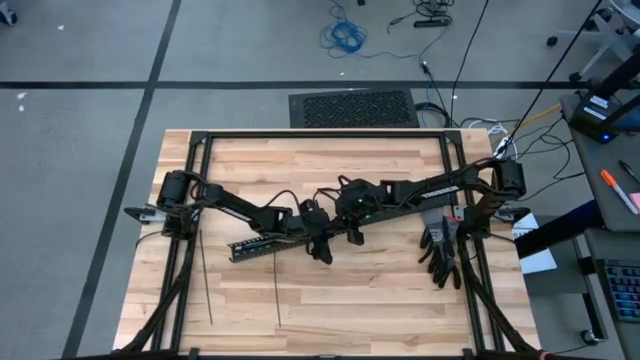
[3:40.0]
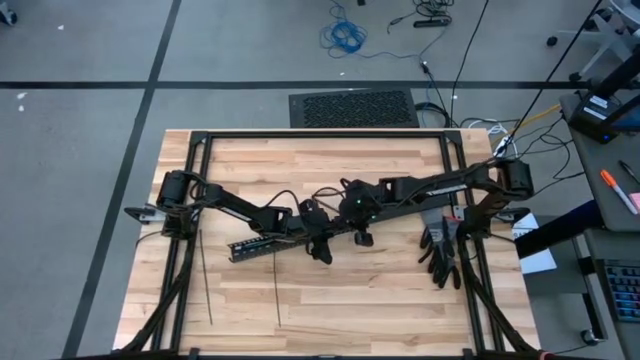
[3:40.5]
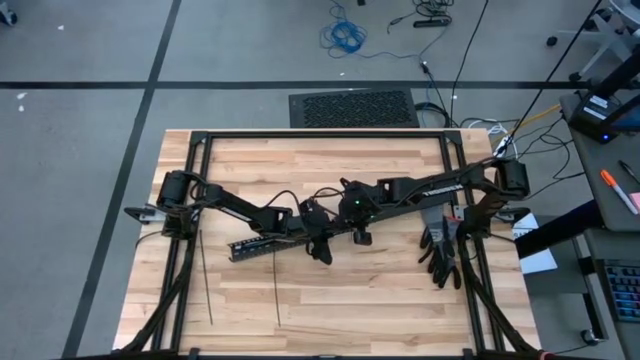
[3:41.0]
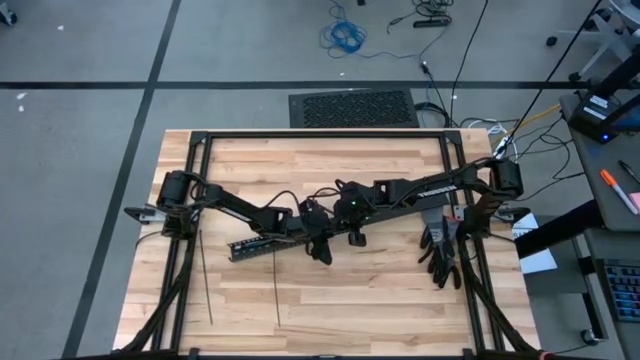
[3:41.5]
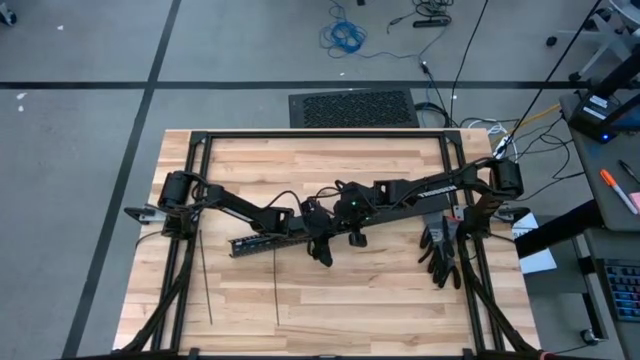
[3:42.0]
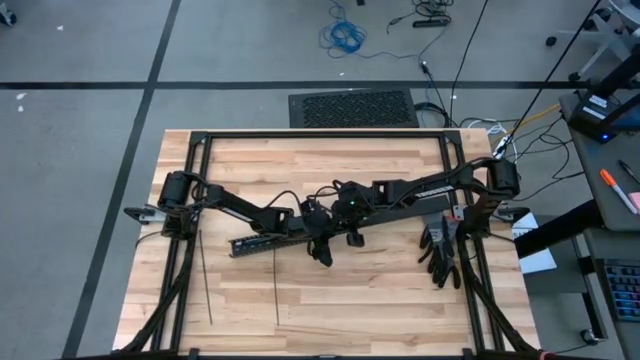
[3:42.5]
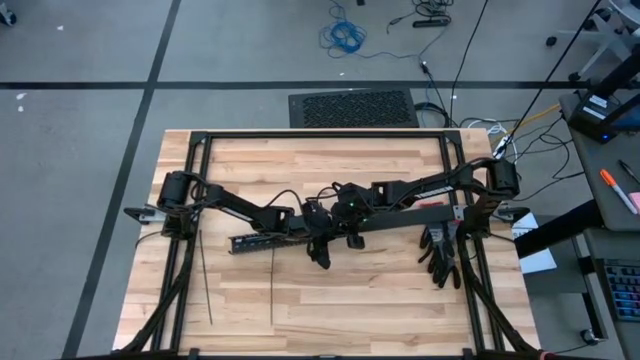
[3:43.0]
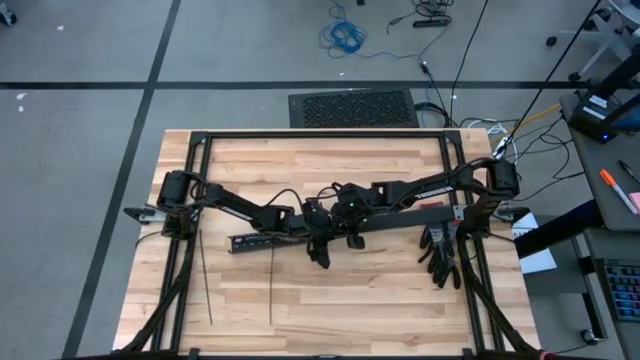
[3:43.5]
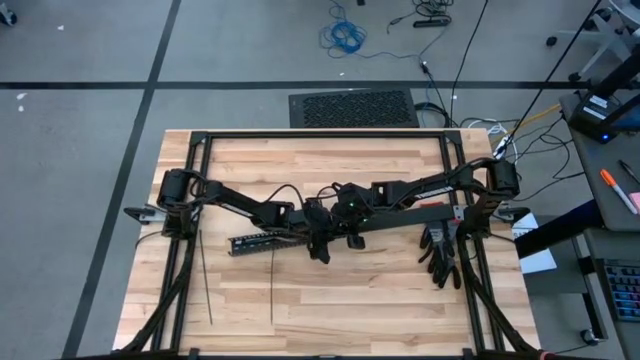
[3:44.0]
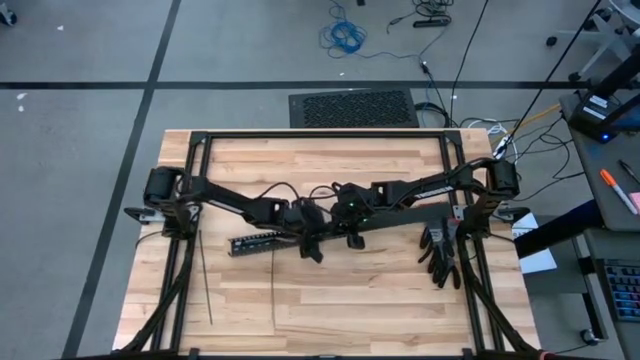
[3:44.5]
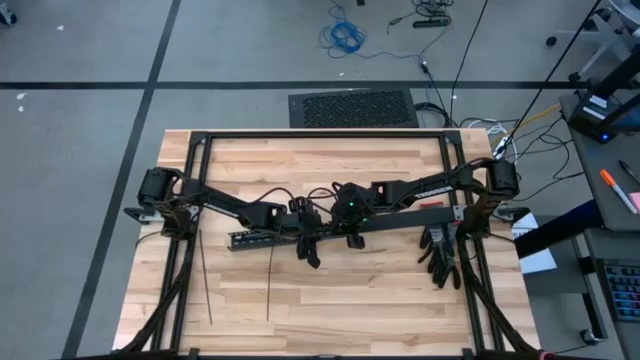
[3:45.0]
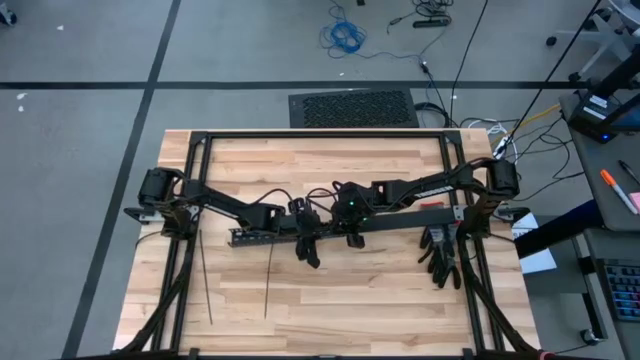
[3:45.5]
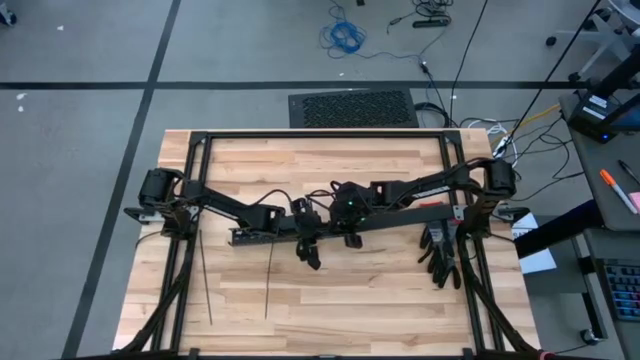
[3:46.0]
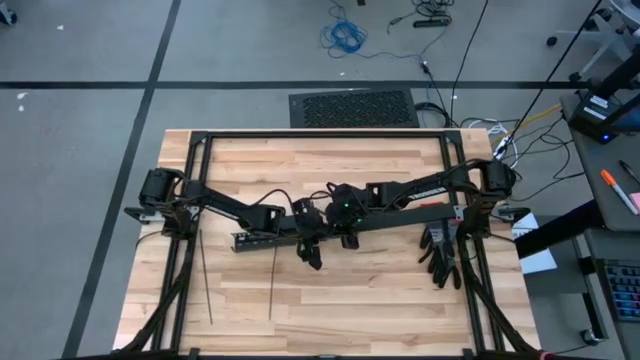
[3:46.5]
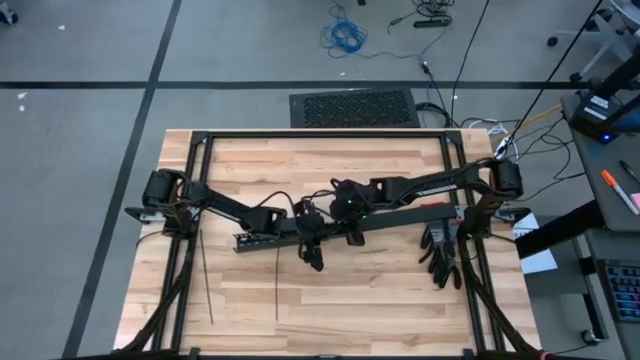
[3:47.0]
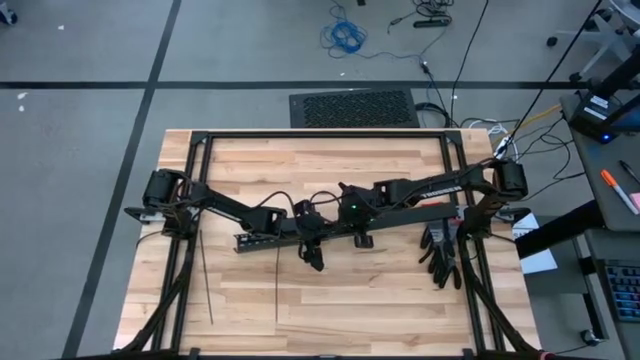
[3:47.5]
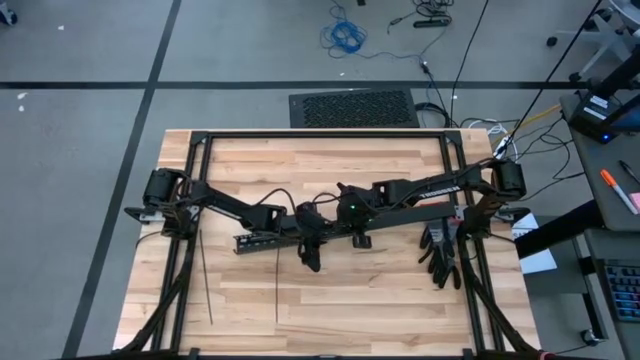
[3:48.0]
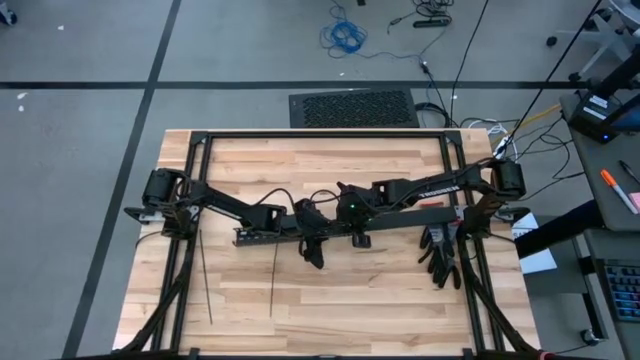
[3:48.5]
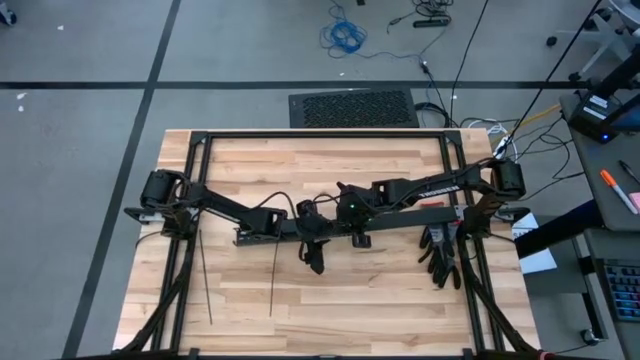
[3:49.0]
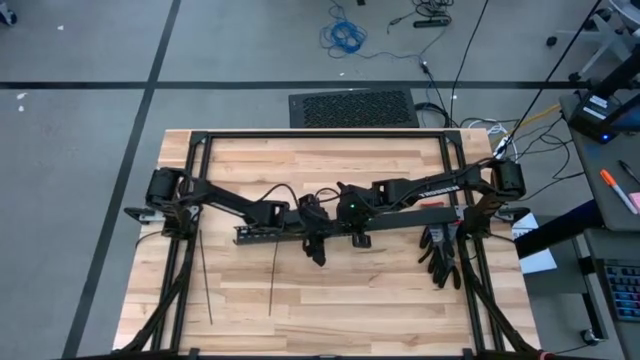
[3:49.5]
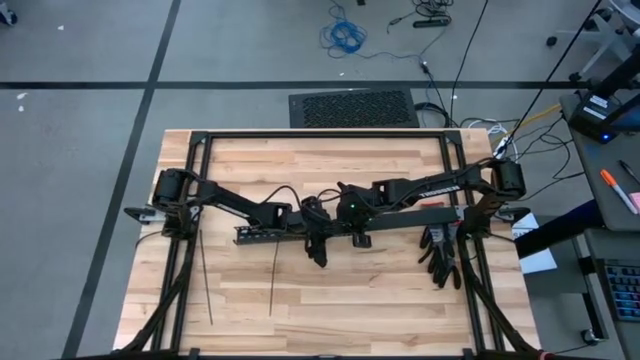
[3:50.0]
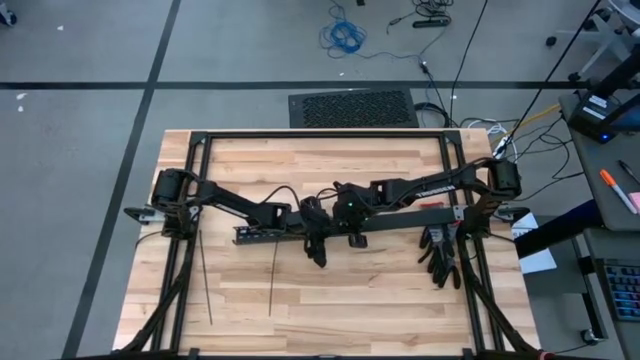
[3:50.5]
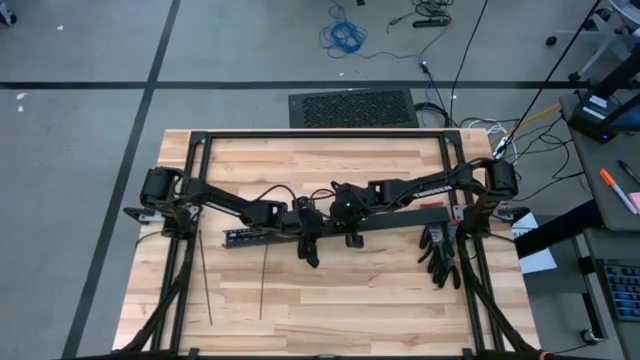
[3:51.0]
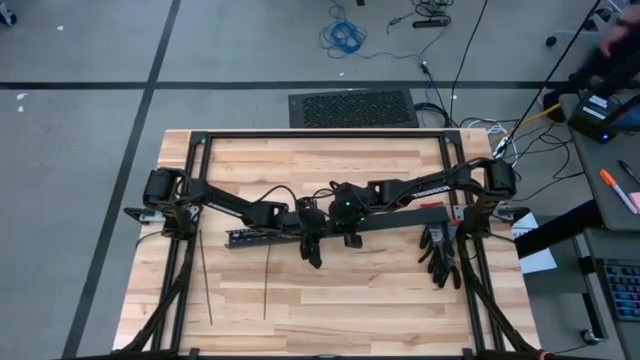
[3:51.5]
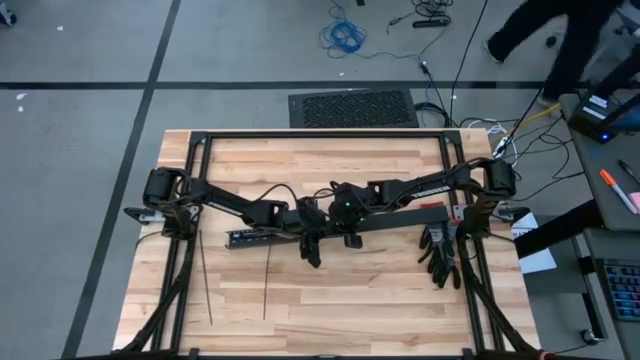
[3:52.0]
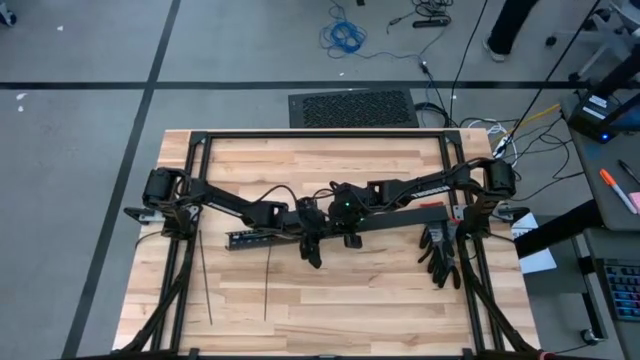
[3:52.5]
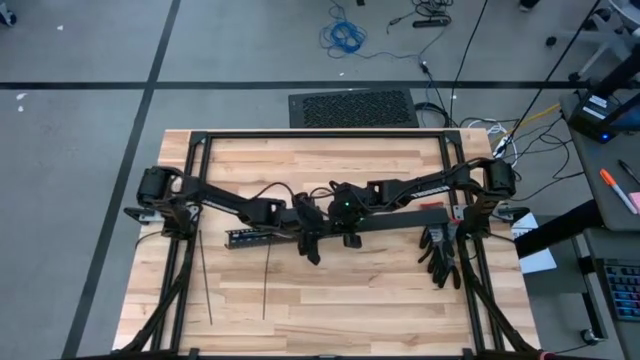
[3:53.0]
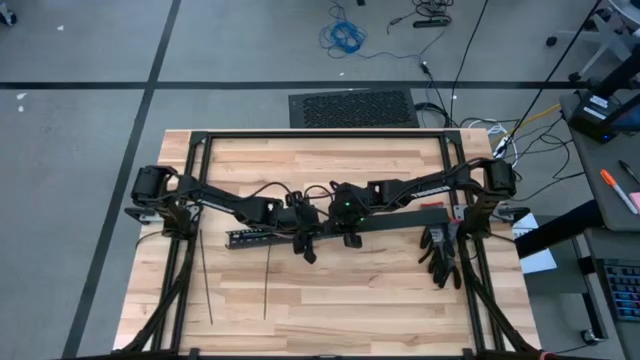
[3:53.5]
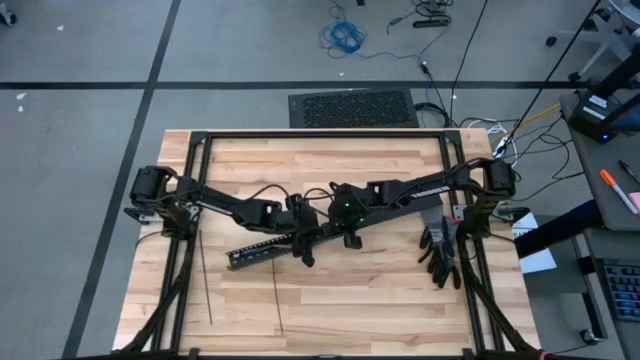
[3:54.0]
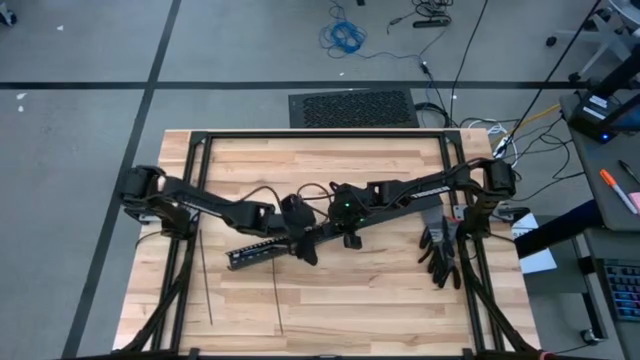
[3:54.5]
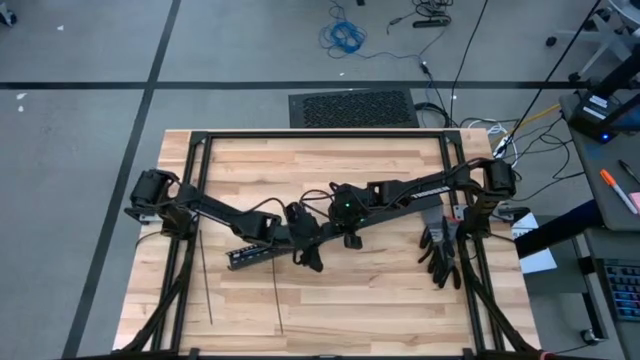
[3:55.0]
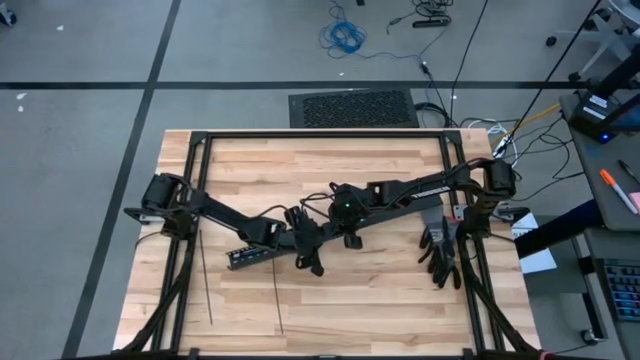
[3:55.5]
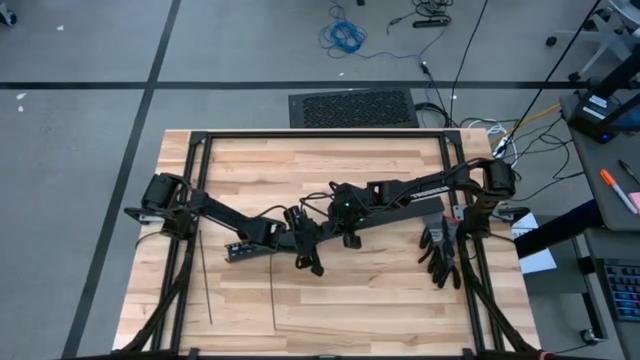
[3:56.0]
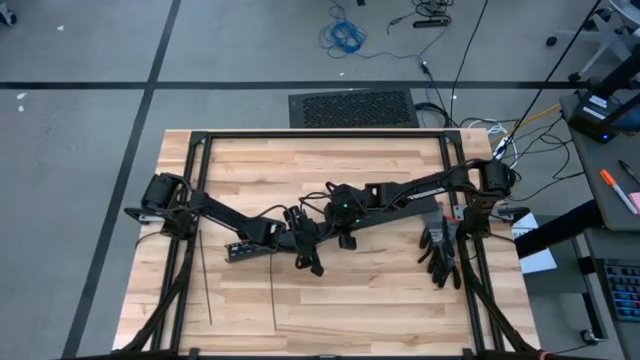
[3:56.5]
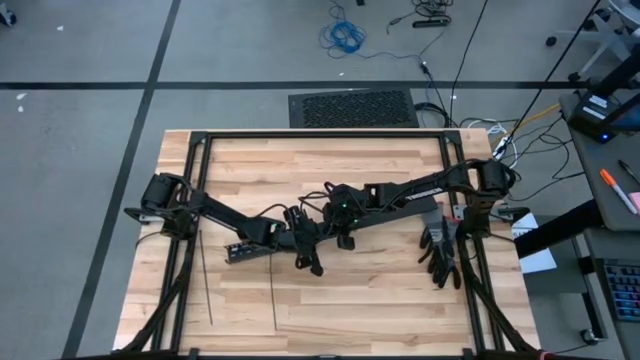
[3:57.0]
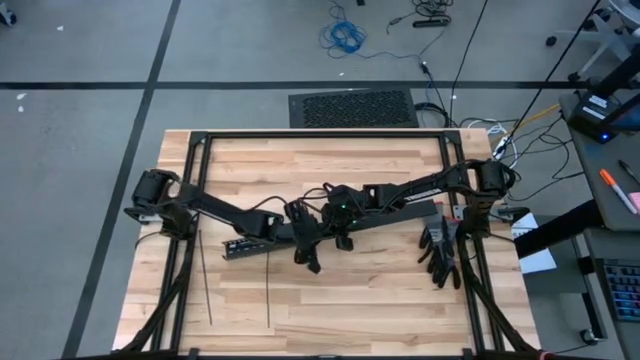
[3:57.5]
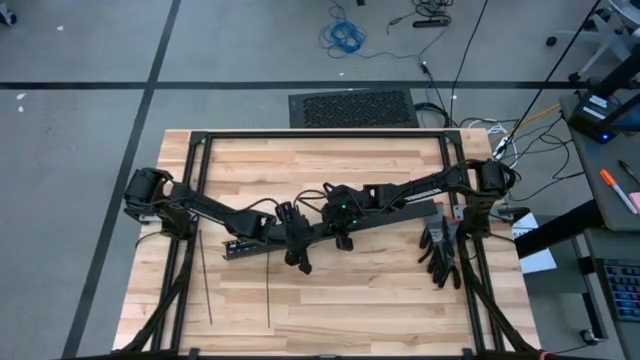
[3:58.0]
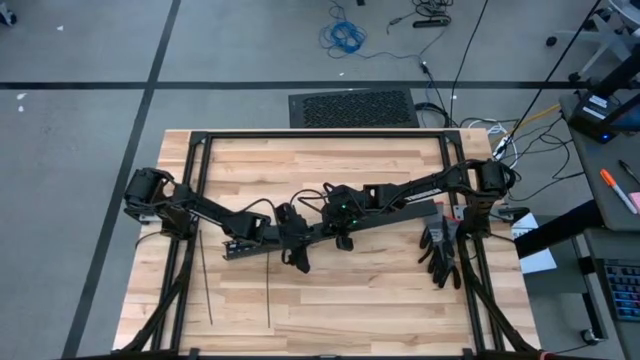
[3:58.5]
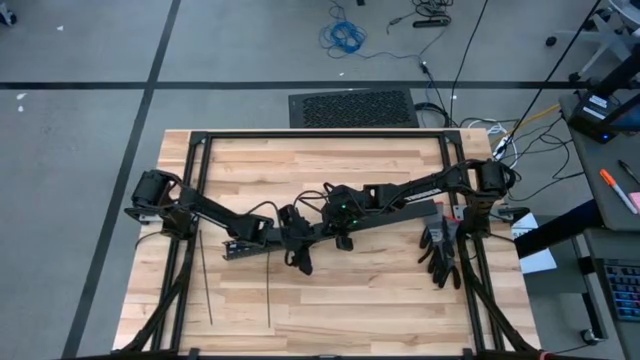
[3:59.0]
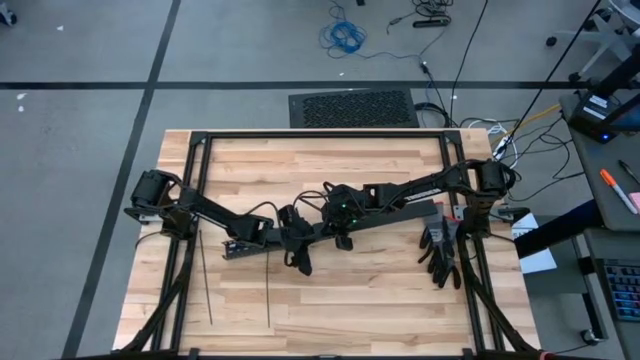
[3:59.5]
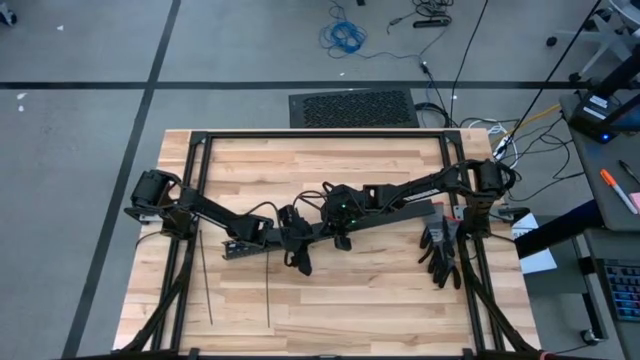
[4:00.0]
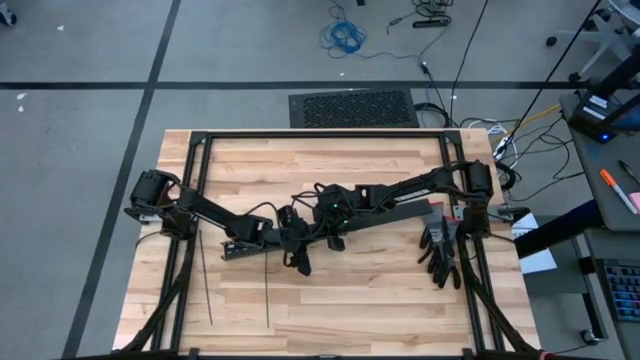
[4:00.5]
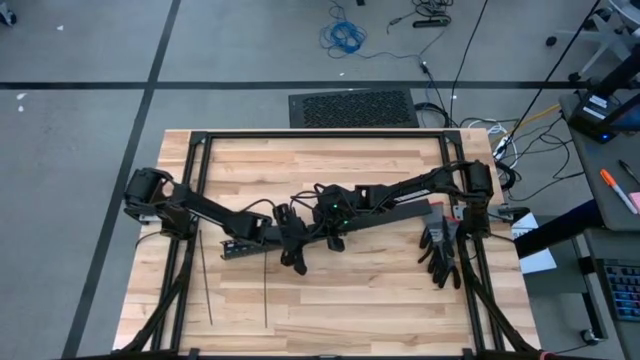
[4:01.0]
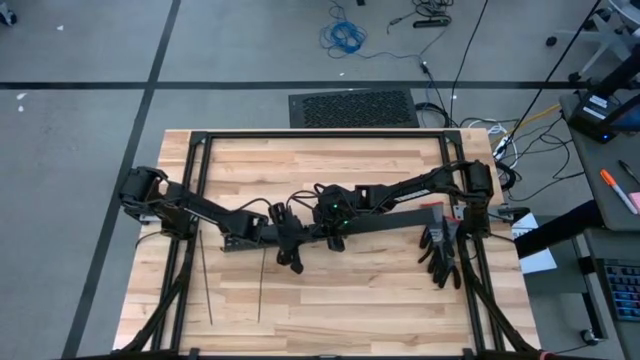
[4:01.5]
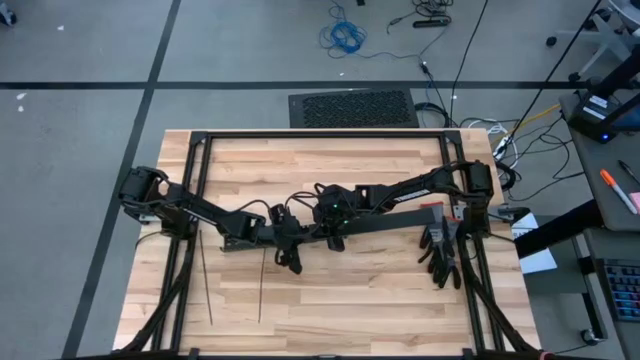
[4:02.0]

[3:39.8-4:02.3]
Task: Ziptie cables
Close the black cable duct with the cable duct cover
